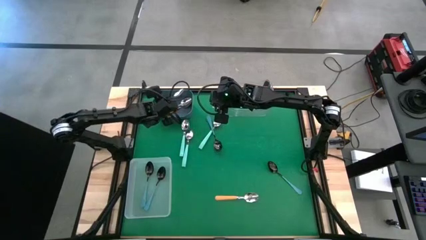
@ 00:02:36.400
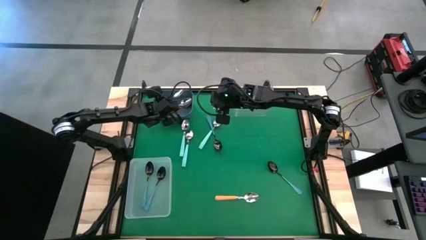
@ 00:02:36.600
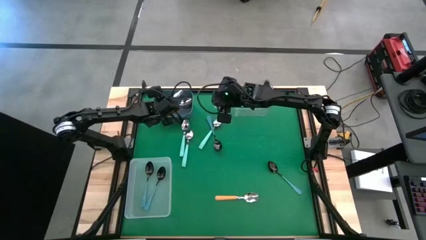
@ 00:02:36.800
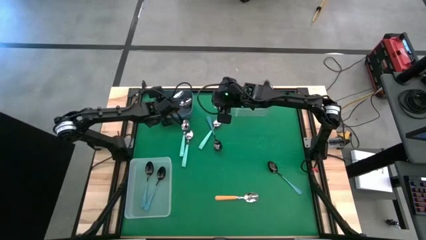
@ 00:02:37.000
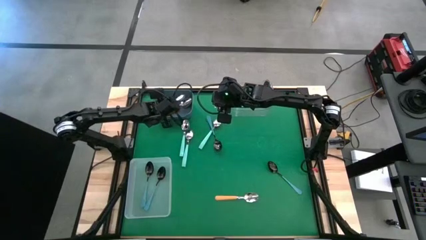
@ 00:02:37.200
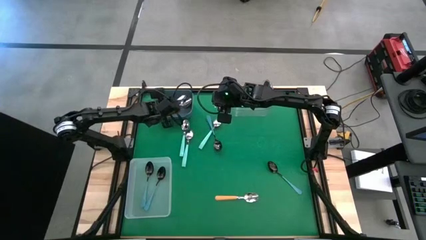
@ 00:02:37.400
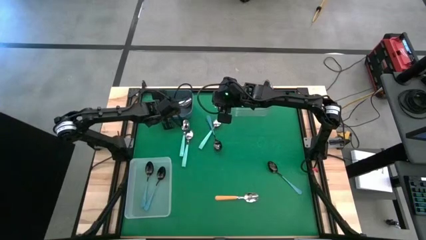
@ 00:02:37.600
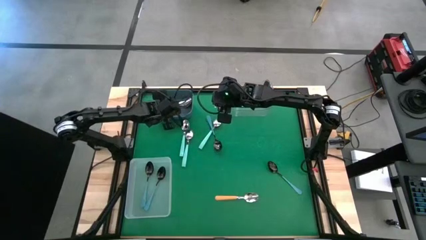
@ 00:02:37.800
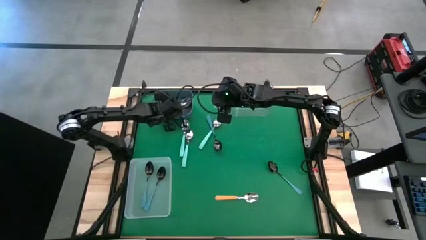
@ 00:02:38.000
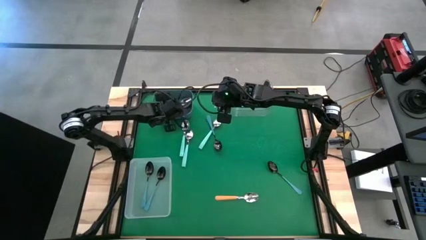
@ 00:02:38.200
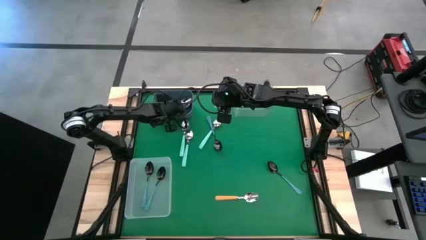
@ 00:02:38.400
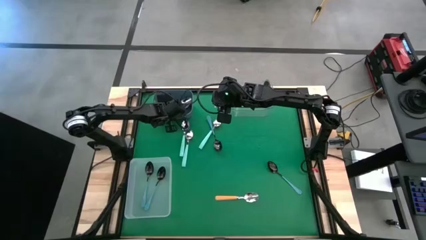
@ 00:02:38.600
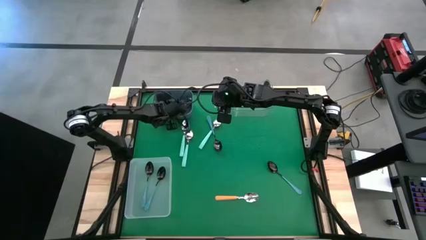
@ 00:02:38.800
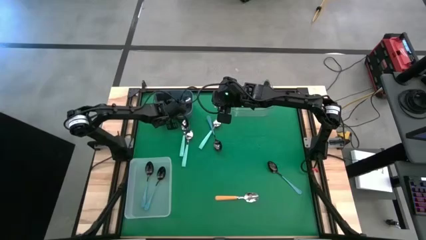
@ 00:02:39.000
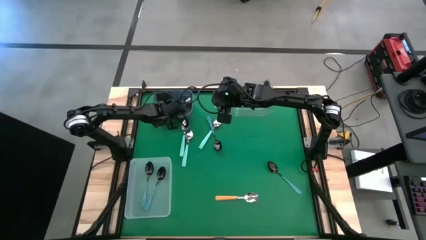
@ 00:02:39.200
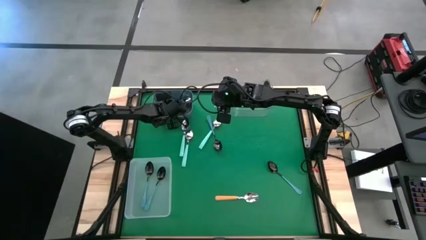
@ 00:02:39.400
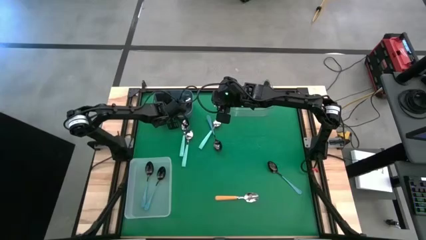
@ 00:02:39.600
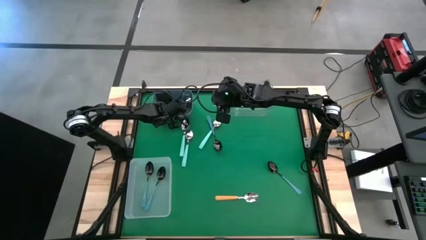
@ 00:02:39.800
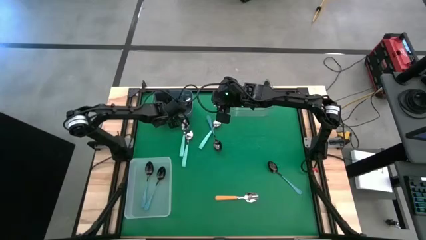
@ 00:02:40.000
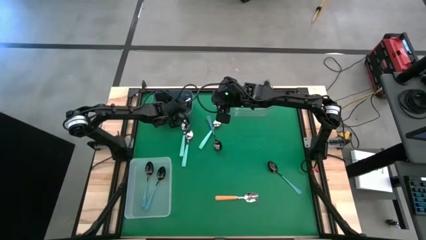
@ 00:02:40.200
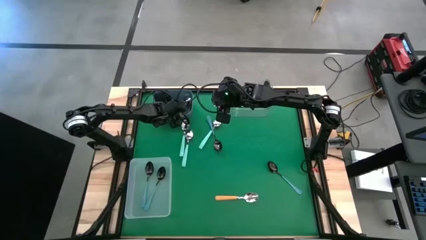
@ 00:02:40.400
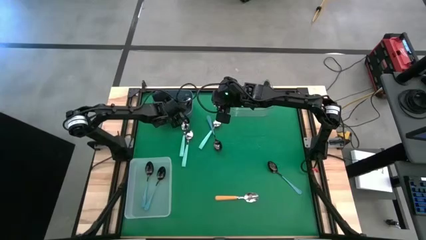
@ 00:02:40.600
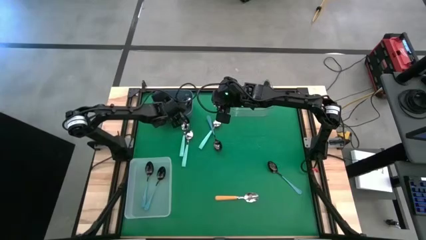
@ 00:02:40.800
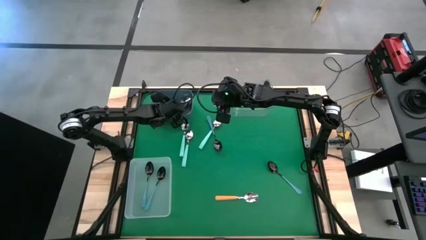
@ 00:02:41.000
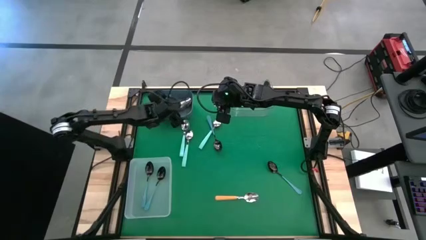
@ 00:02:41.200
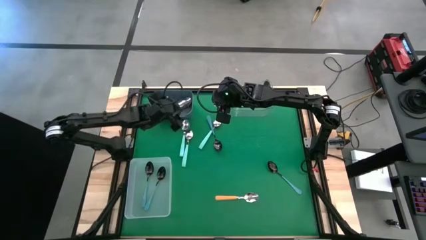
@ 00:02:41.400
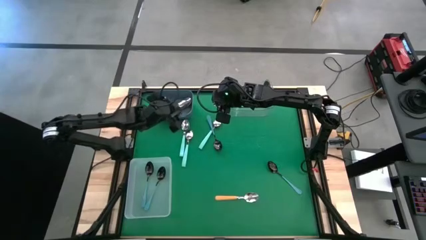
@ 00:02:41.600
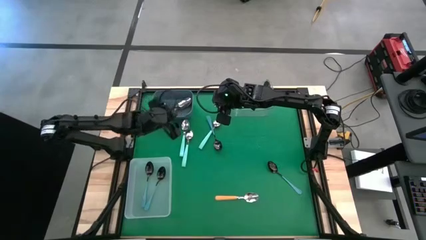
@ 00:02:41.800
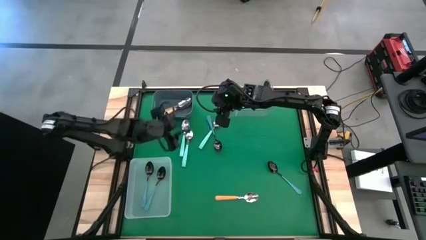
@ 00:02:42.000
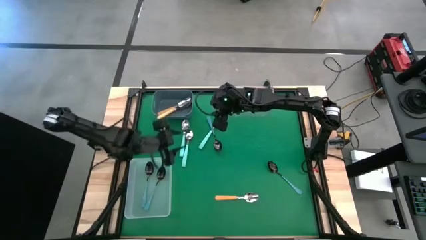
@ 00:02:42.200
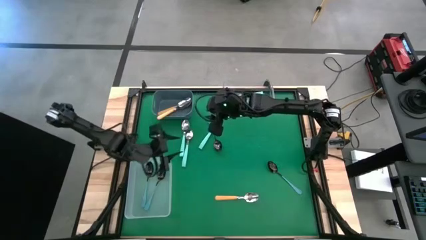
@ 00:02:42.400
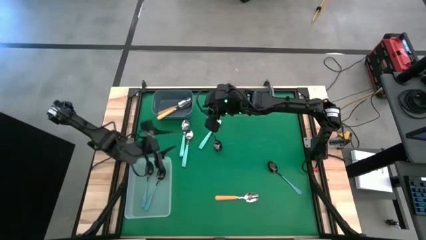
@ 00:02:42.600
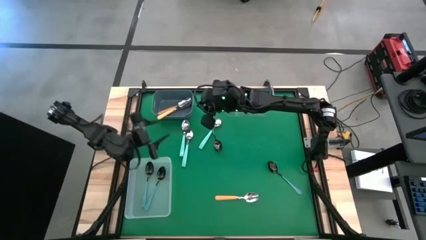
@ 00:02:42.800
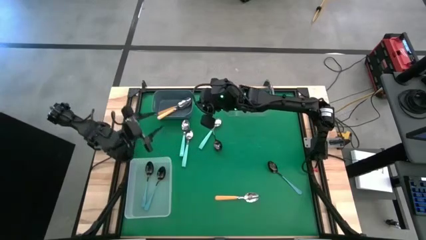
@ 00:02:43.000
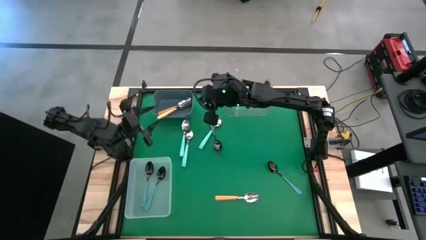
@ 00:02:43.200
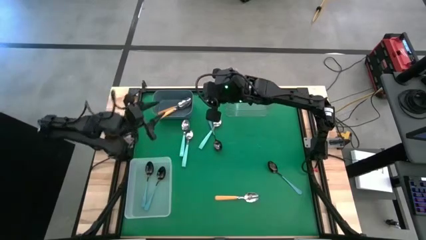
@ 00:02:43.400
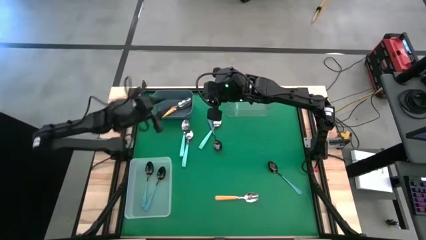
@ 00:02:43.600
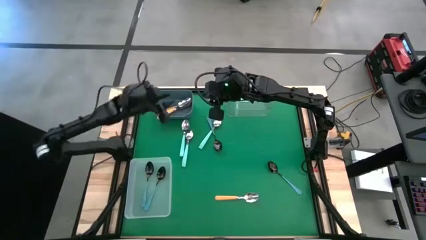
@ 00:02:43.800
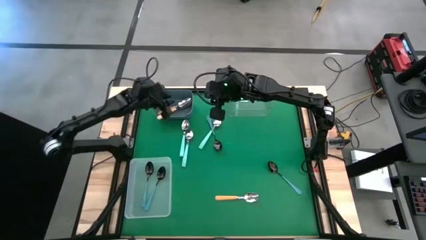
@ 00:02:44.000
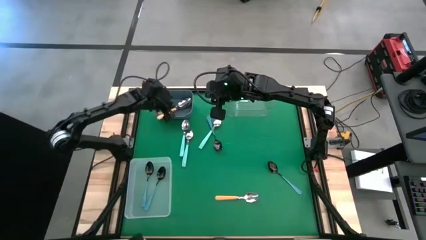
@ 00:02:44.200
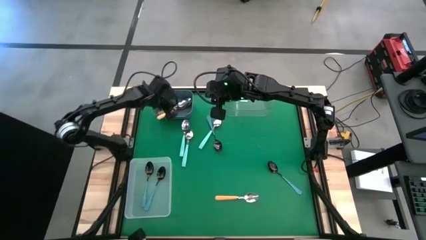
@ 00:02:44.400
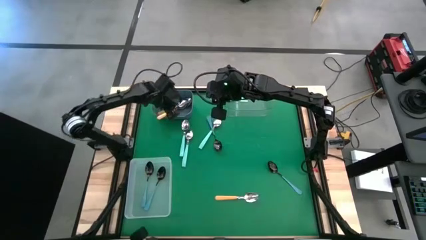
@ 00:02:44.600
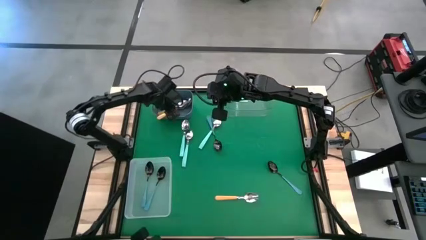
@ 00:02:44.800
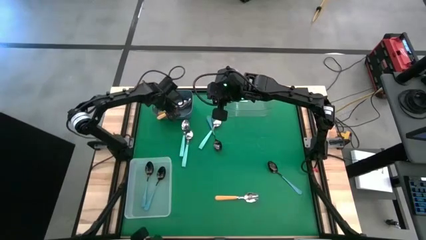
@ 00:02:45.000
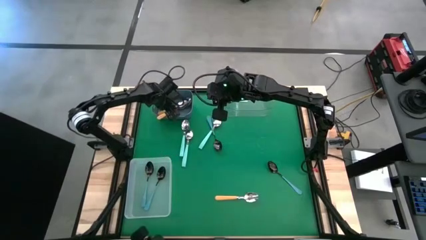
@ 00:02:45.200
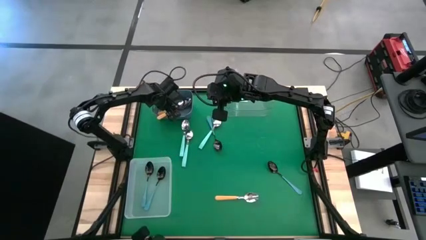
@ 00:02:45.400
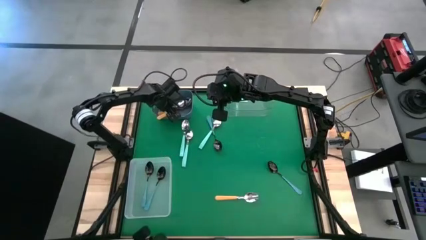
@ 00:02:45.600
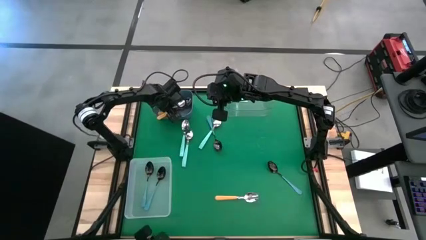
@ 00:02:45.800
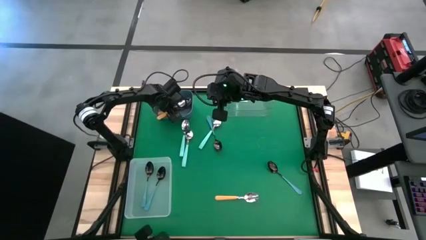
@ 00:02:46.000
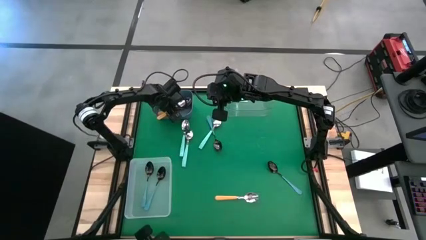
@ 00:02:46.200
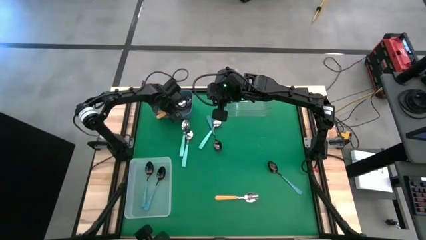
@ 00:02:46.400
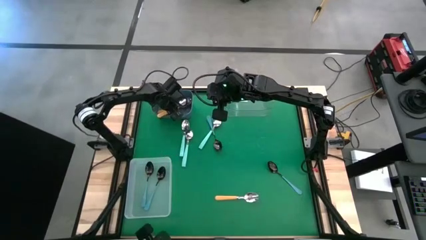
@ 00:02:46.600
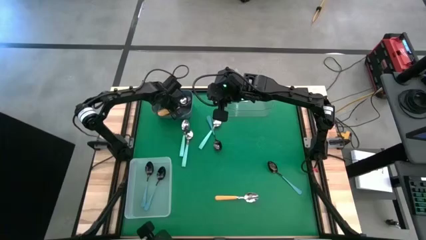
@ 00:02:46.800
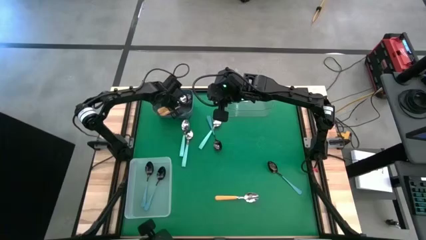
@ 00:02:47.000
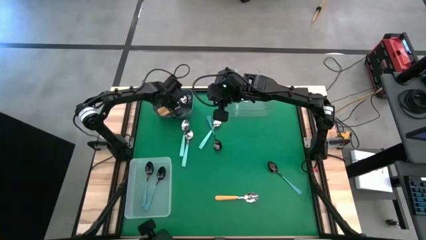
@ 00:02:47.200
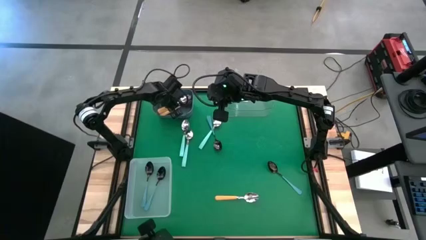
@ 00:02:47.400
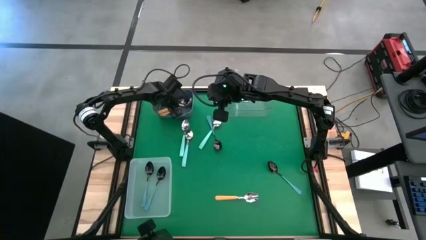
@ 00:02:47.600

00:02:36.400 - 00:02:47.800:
Task: Sort silverware by color (type)
Put the yellow spoon into the gray bin

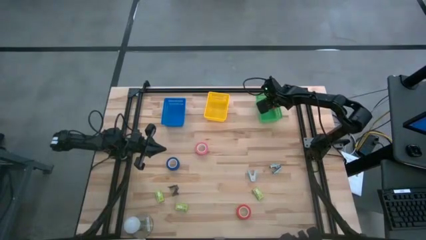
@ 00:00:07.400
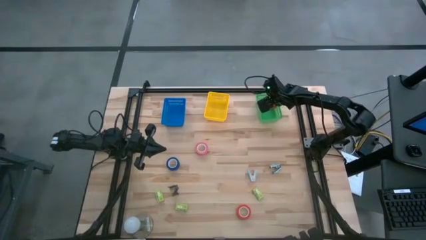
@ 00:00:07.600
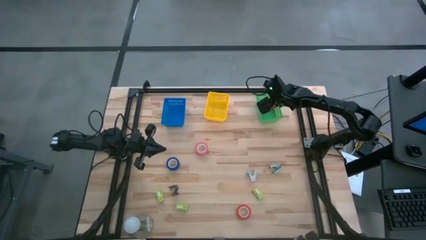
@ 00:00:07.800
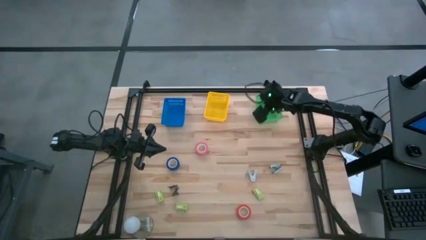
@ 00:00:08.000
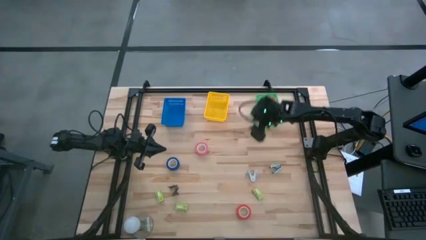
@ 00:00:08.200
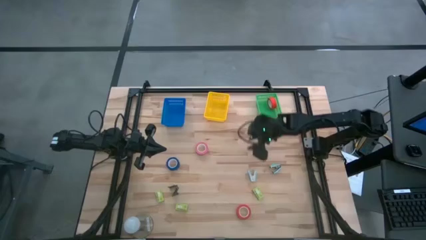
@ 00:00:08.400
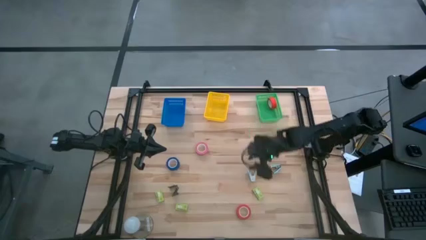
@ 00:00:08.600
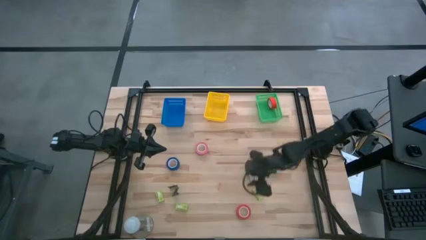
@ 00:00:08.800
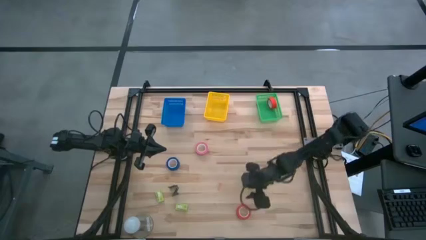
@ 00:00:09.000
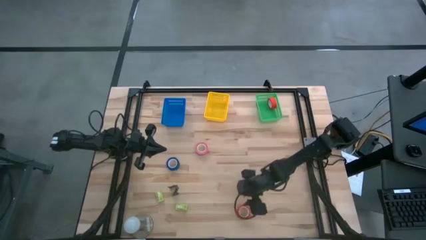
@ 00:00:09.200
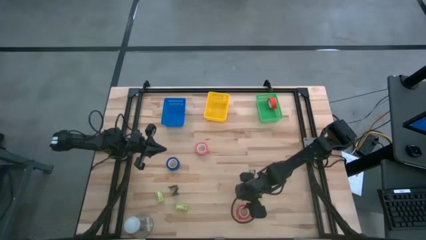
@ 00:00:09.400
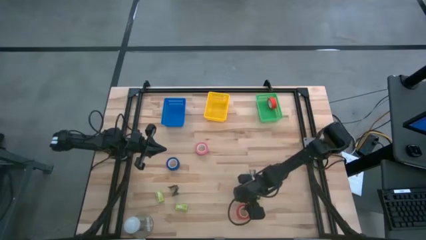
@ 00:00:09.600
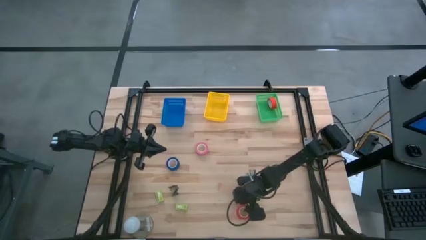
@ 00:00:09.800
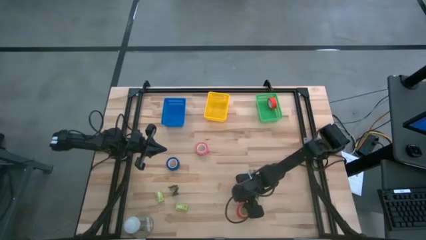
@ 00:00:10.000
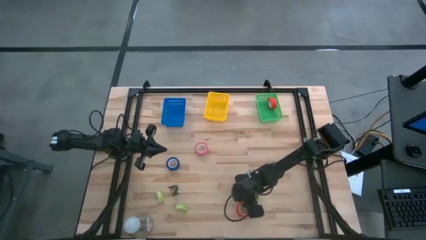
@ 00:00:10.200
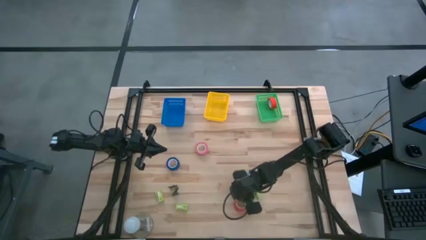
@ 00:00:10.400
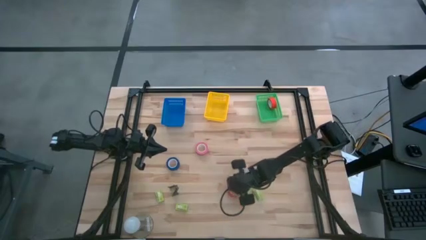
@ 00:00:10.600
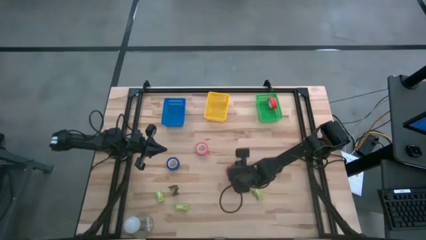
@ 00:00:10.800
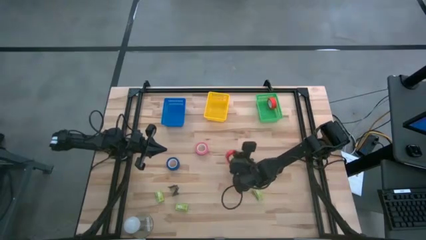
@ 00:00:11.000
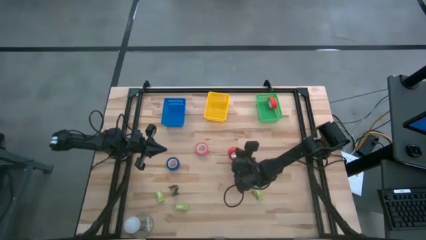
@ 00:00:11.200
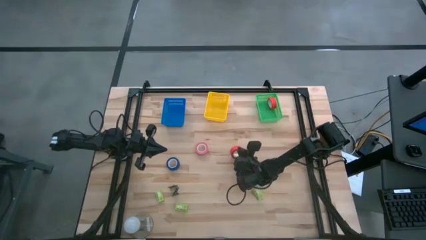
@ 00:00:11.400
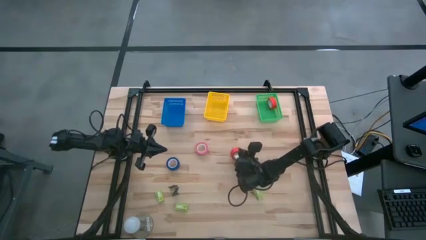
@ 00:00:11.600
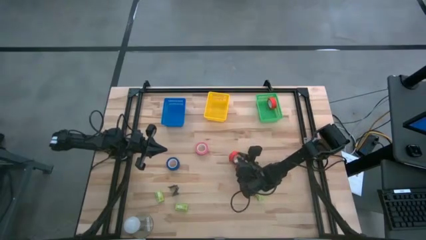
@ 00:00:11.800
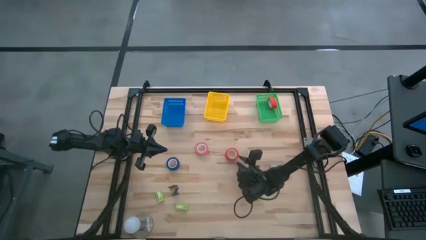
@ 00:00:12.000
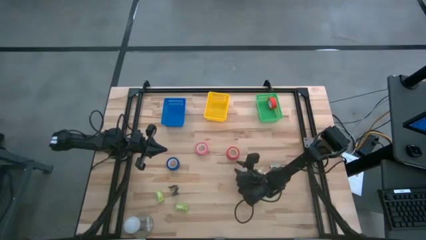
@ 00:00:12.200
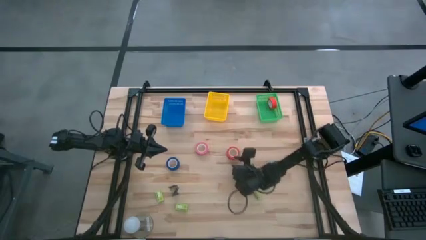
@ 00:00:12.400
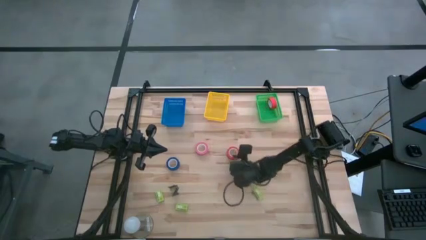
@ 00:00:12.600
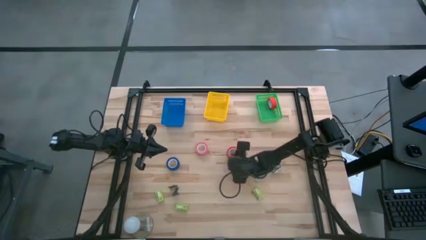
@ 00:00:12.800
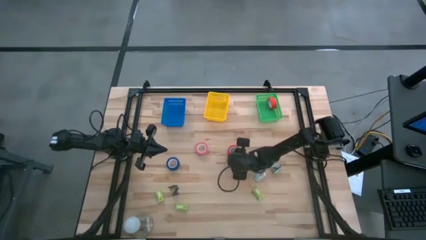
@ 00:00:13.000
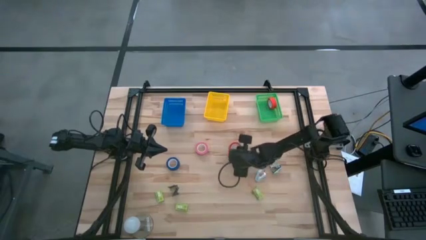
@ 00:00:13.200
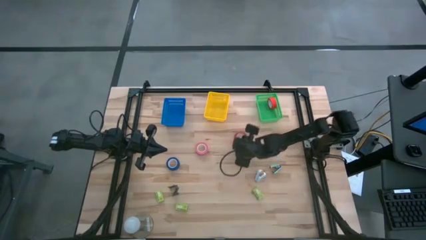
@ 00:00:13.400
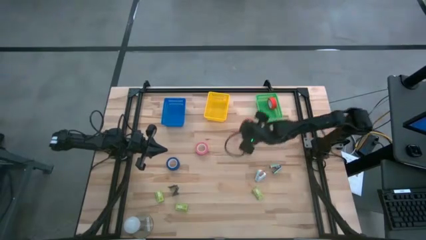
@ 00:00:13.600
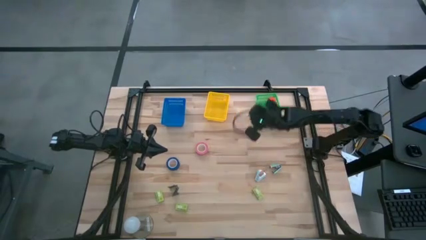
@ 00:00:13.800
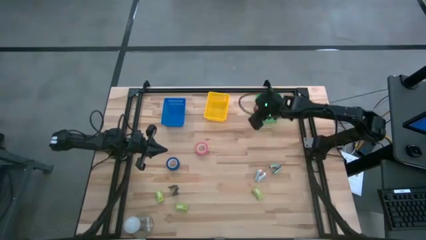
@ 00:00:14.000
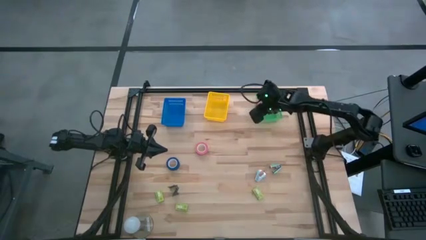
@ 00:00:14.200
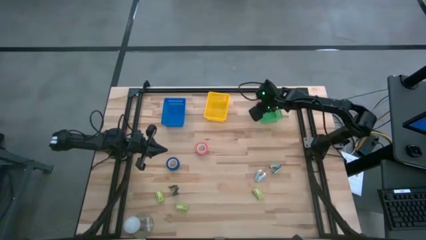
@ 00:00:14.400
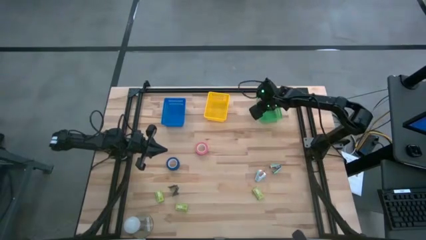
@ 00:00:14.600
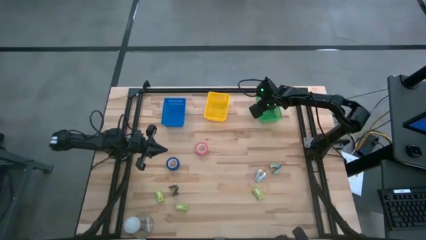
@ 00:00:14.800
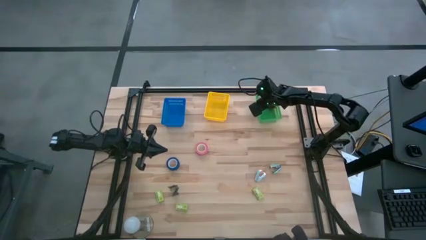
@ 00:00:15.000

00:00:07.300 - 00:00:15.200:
Task: Pick and place Stapler, Stapler remover, tape
Put the red tape into the green bin
